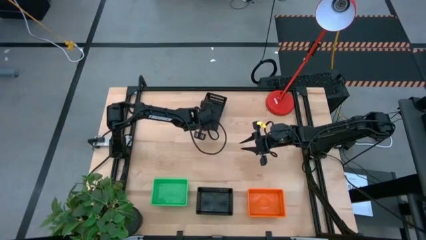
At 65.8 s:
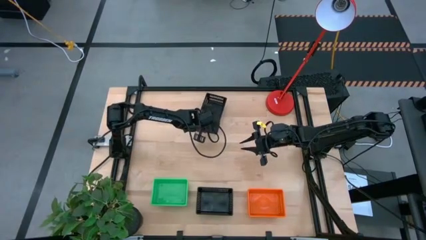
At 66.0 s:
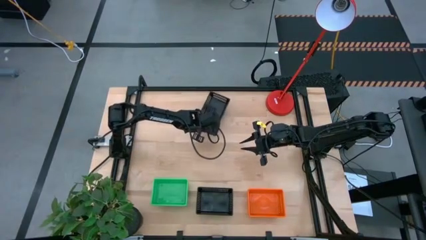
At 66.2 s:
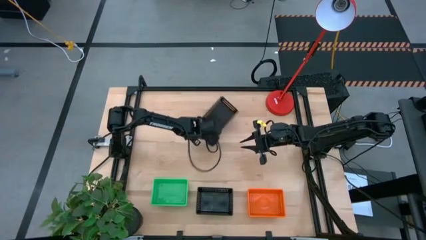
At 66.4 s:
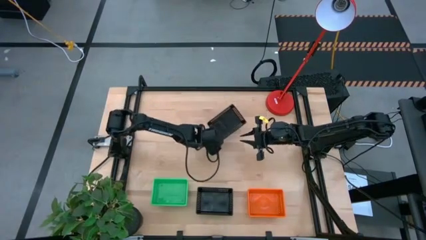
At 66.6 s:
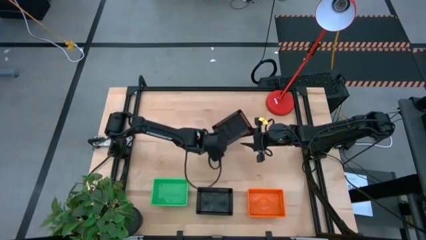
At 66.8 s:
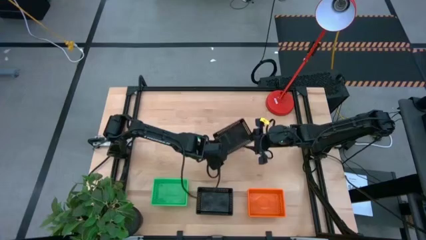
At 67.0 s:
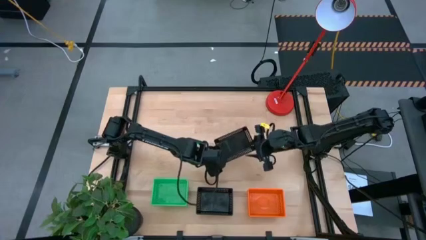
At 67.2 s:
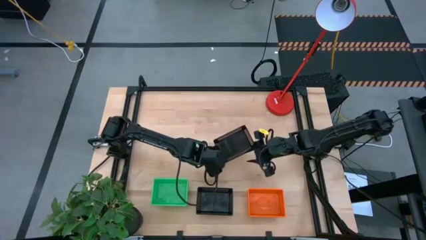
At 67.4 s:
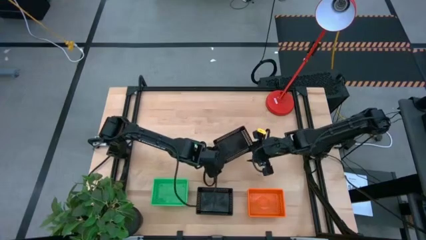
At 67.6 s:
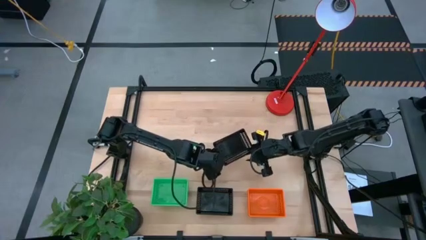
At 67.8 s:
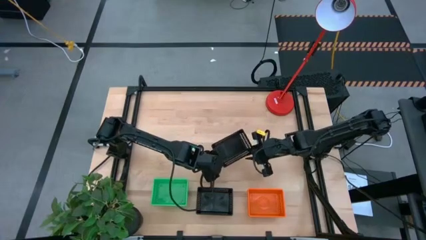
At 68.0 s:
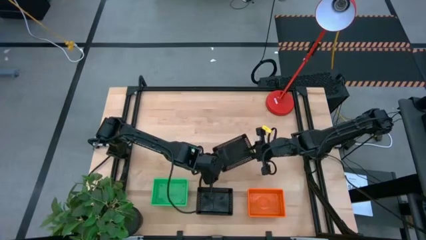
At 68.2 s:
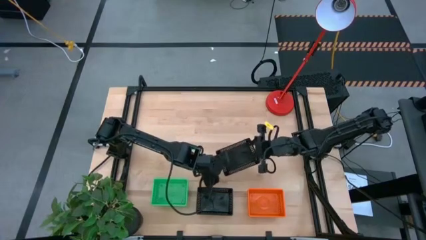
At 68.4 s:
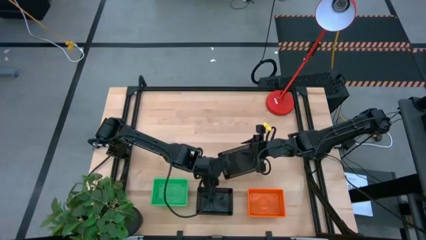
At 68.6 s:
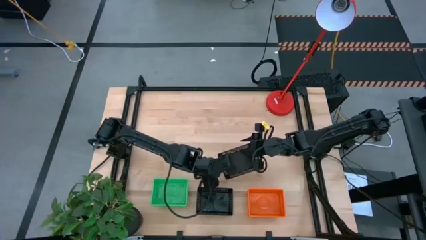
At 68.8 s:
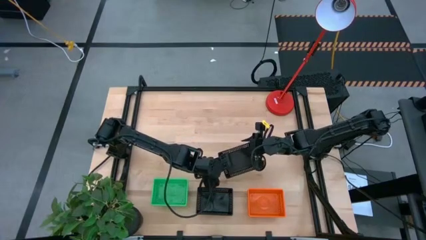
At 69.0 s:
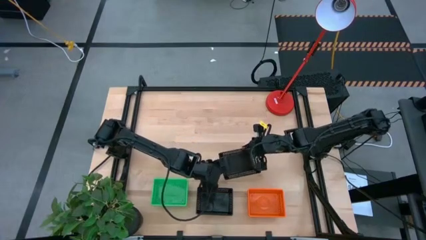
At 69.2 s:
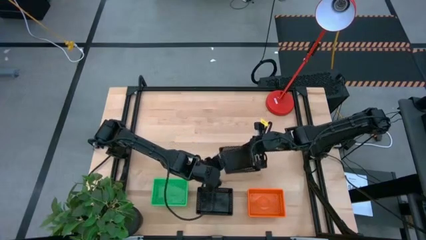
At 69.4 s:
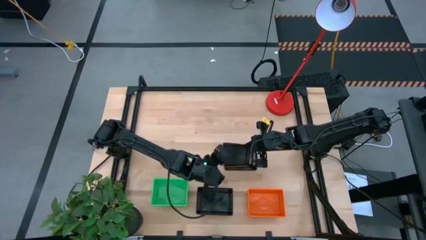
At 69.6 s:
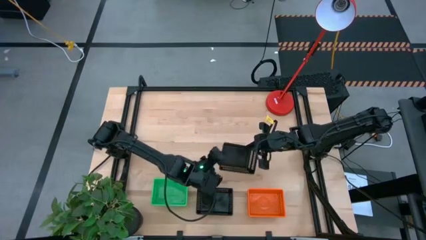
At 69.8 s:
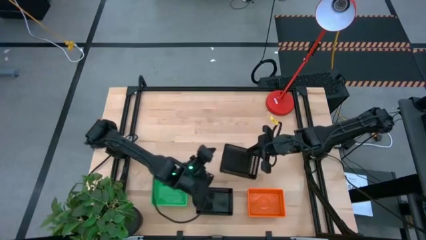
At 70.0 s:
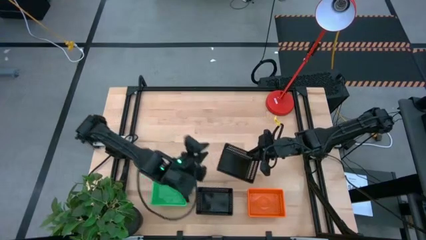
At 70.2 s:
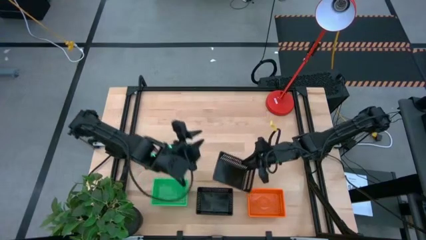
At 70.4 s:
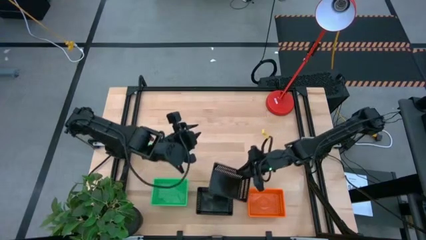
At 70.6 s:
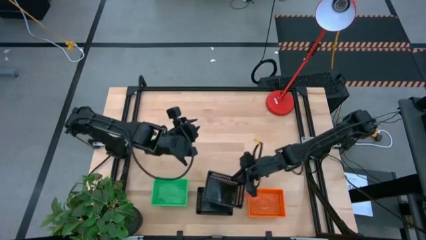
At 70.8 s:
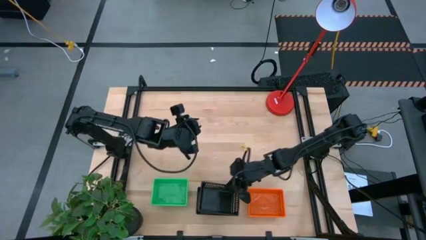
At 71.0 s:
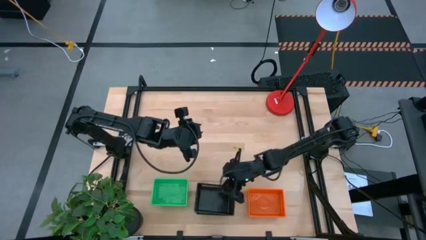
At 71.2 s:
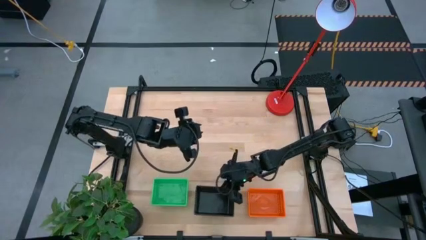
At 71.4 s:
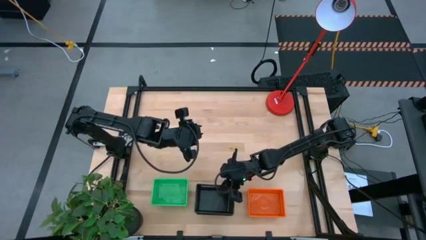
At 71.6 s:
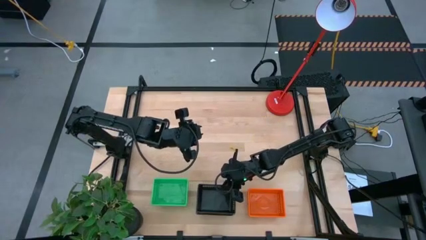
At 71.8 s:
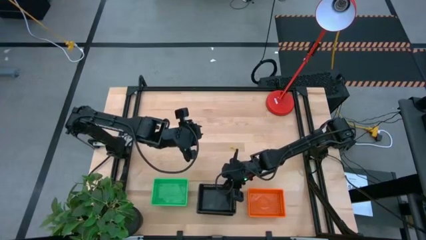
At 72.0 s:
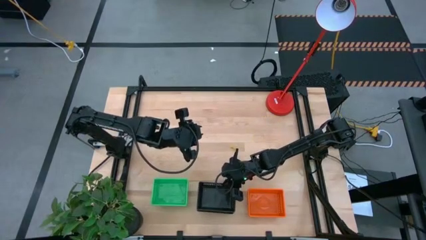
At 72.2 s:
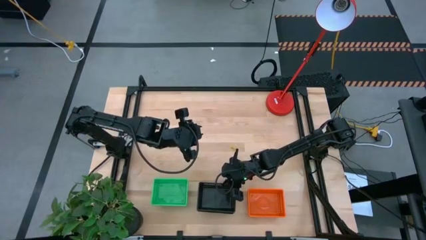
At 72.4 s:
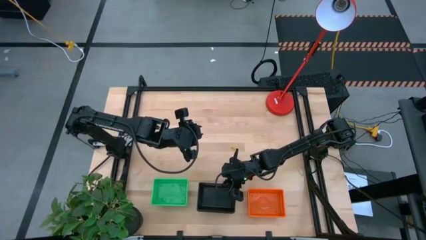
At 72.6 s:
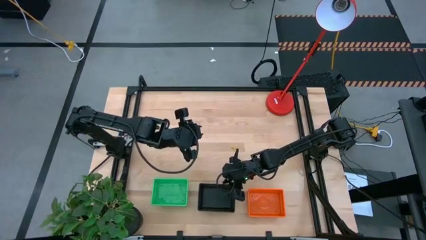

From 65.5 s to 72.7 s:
Stack the top black bin on top of the bottom black bin

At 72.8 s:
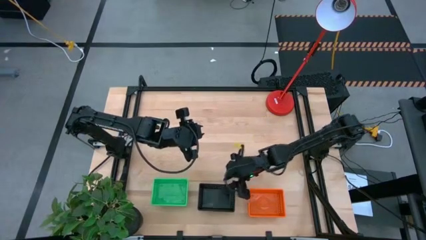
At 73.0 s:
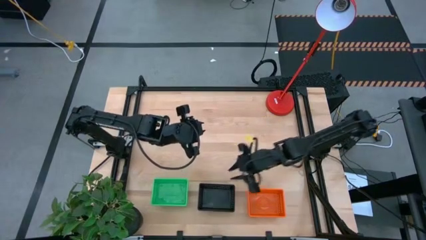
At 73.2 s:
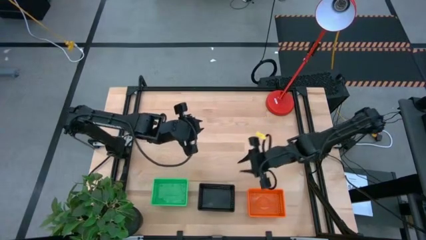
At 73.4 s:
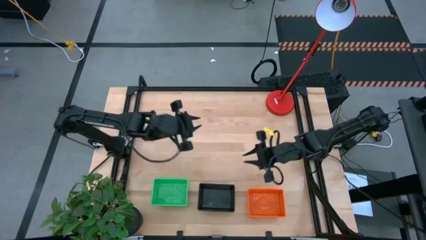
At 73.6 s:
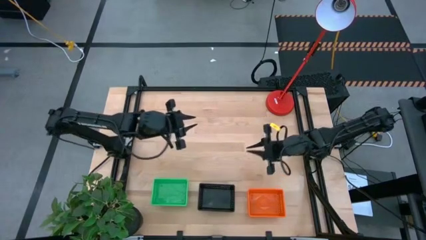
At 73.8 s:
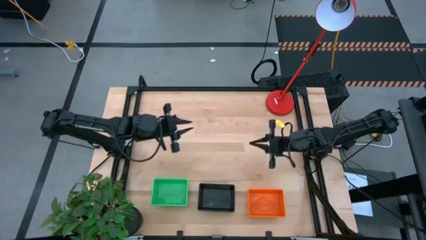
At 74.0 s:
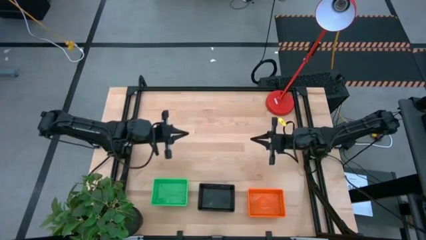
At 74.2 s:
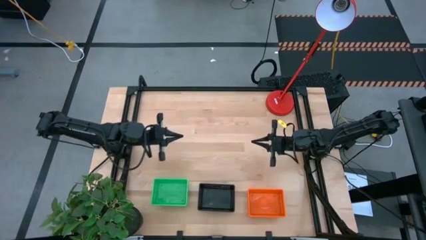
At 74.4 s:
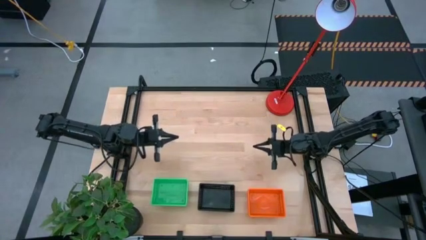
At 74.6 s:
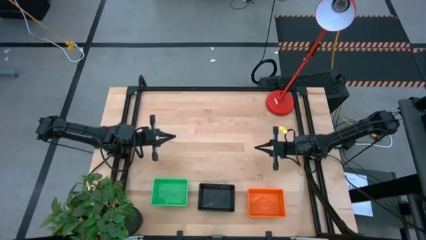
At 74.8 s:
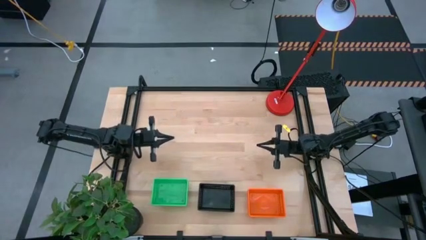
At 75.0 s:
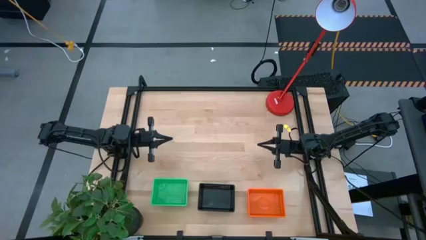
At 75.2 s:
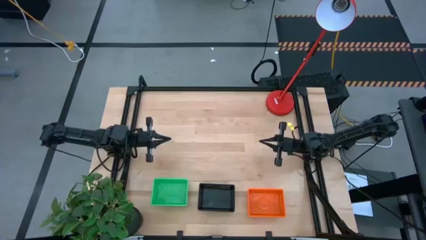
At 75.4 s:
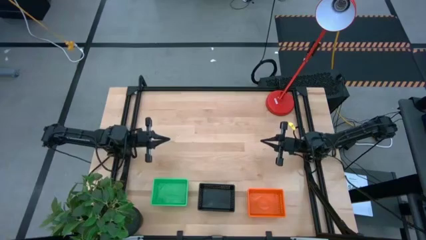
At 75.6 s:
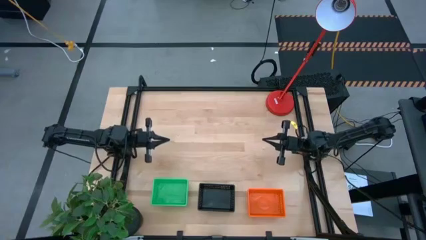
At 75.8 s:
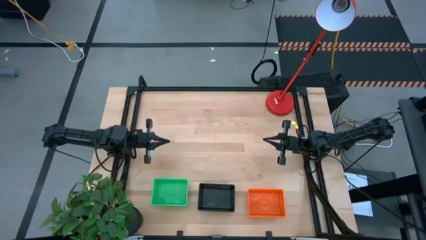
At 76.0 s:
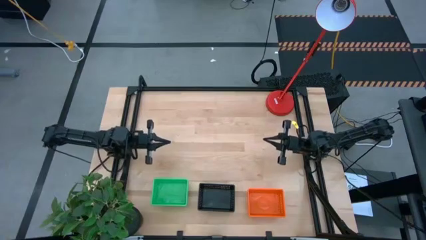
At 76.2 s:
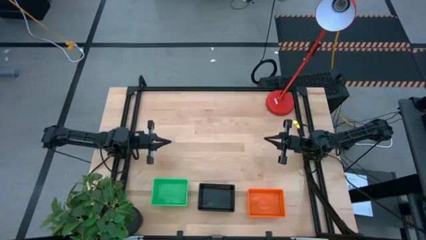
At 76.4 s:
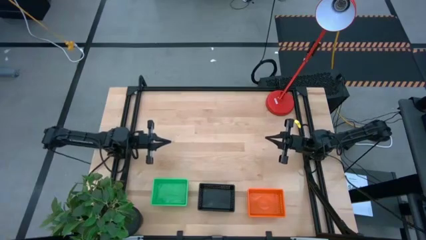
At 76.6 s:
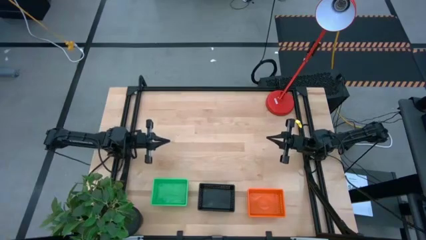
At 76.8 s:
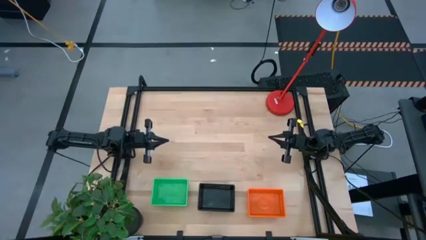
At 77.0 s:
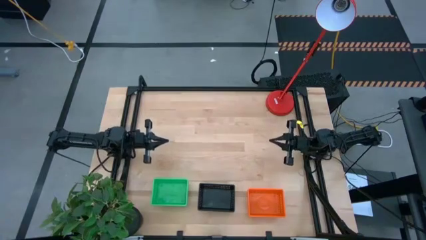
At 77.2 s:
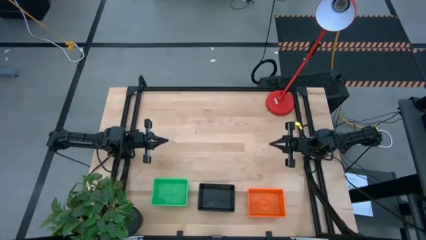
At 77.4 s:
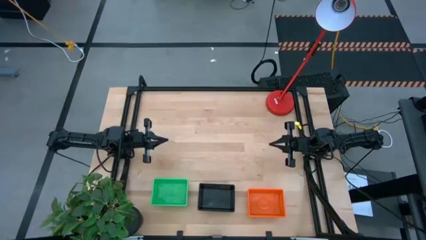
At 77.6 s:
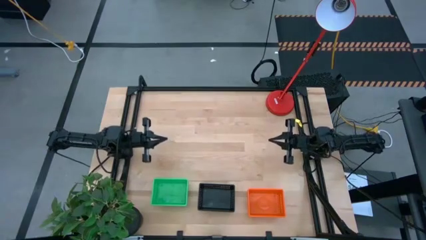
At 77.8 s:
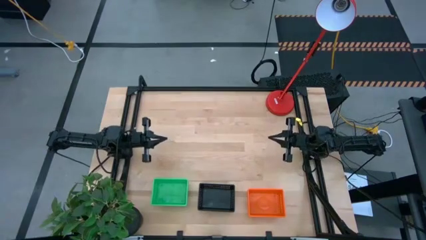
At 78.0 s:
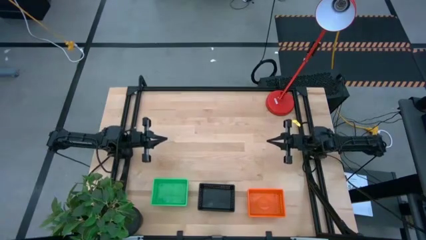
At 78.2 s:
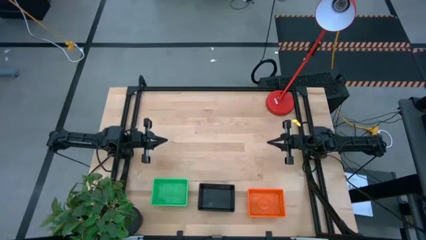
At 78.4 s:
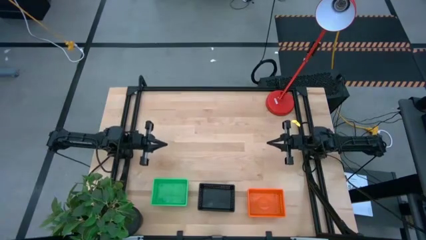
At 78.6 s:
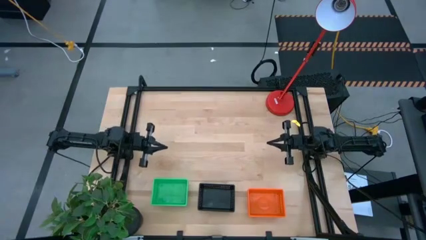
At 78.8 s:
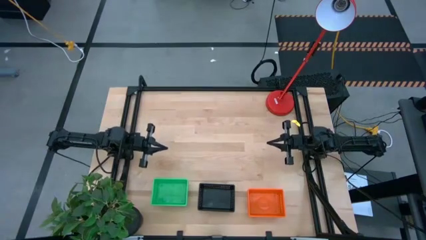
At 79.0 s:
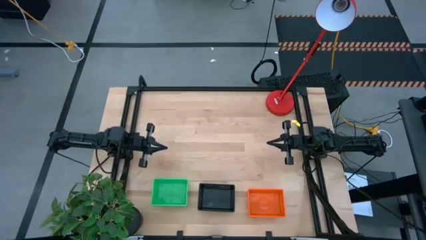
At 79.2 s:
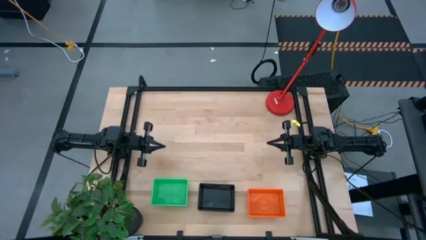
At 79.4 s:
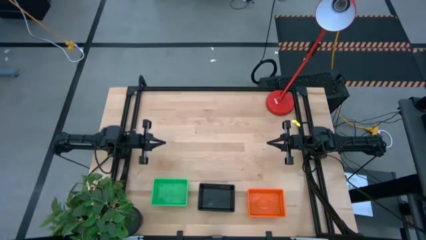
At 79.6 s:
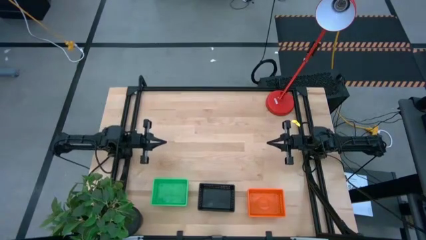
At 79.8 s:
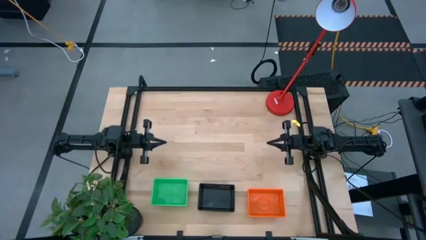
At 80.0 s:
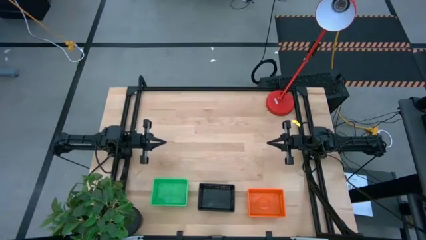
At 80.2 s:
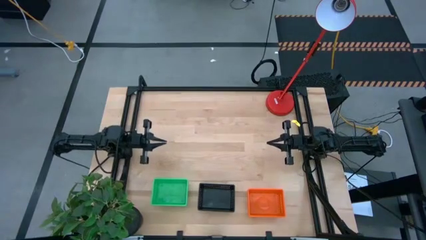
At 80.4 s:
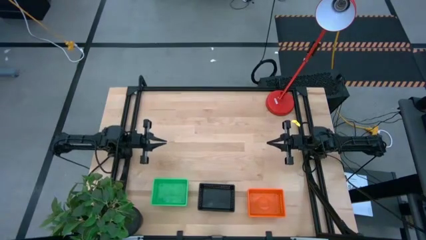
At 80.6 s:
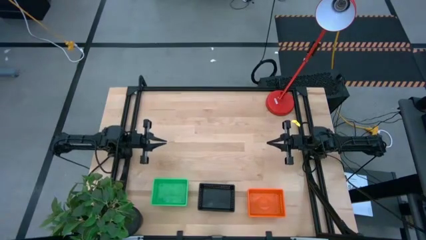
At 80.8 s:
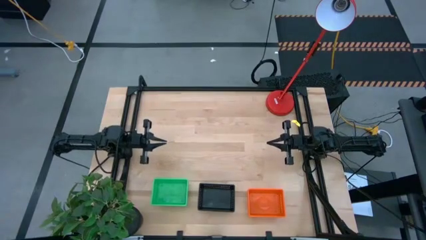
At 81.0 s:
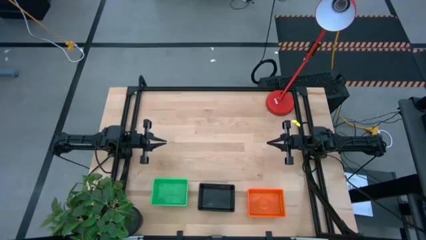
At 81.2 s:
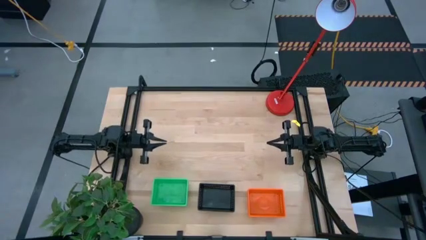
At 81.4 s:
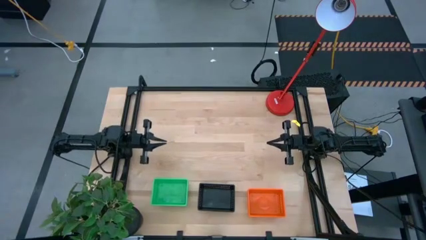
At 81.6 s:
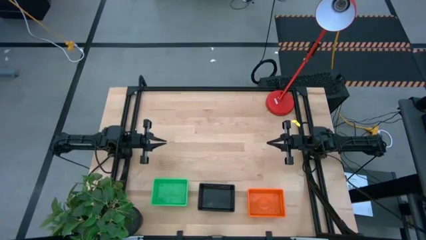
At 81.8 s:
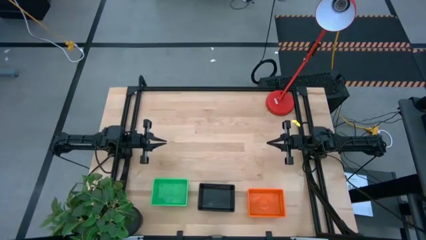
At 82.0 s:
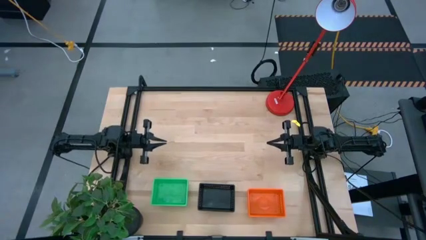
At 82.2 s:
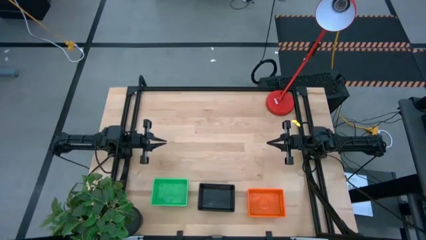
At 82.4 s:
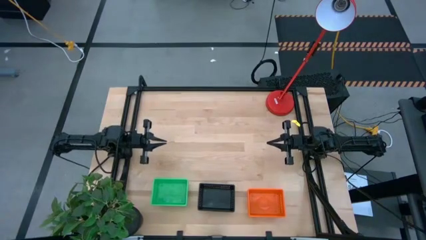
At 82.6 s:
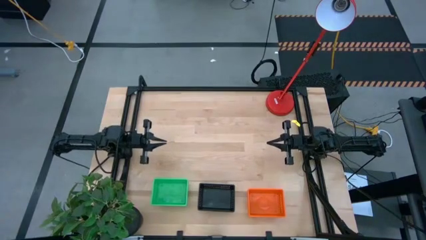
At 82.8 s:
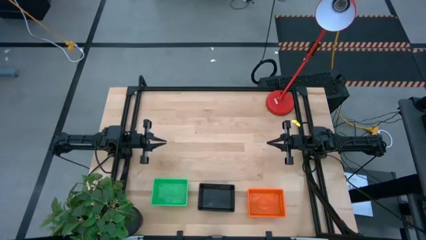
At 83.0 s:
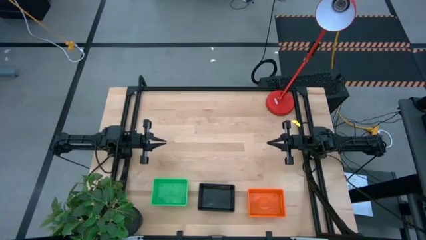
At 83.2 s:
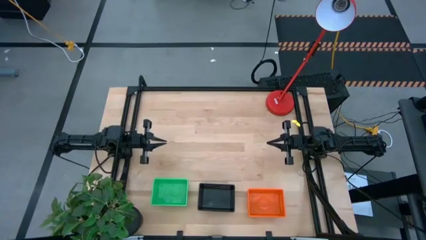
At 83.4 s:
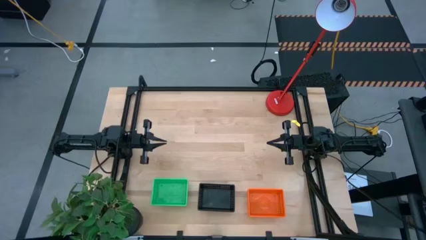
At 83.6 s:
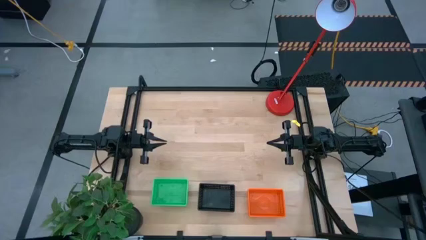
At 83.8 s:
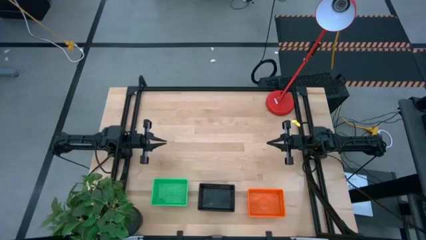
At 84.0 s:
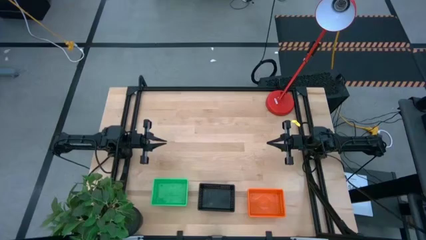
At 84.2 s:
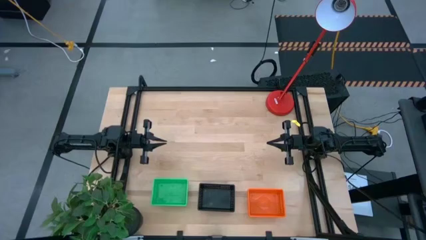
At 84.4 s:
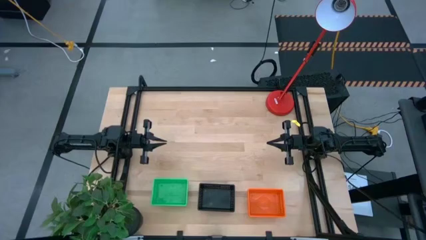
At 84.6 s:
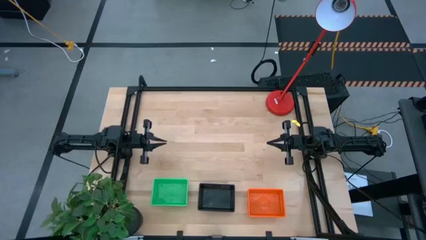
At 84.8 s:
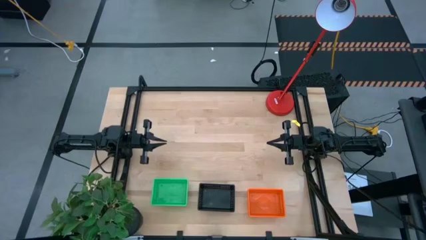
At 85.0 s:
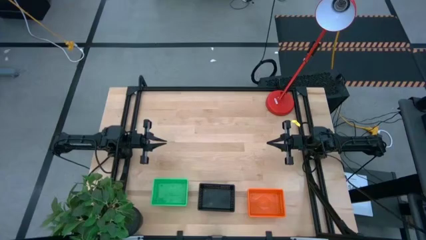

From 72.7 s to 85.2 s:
Return to Home Position
